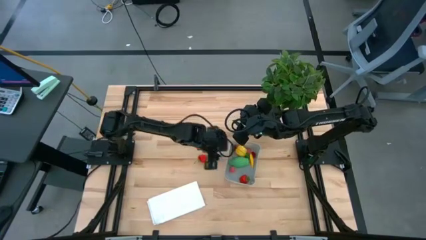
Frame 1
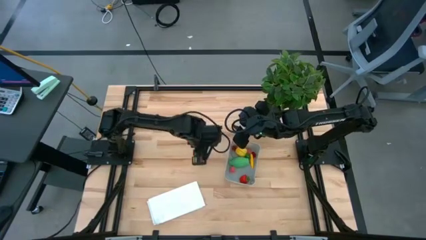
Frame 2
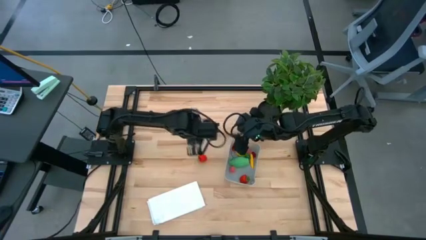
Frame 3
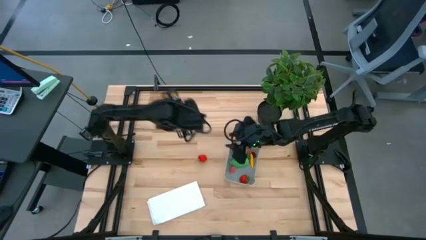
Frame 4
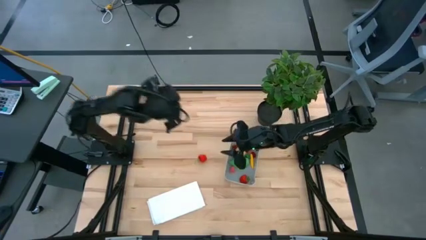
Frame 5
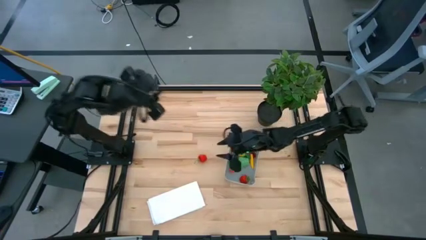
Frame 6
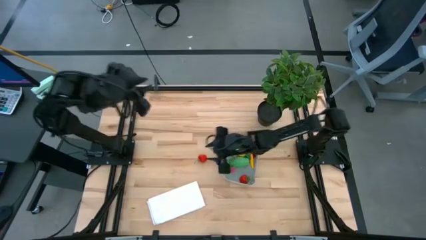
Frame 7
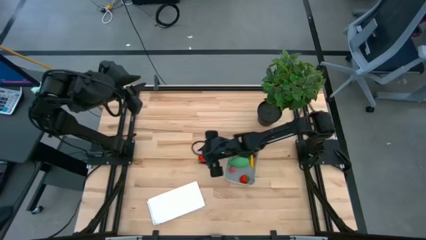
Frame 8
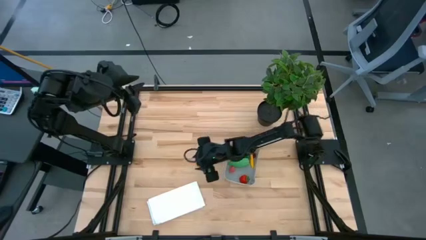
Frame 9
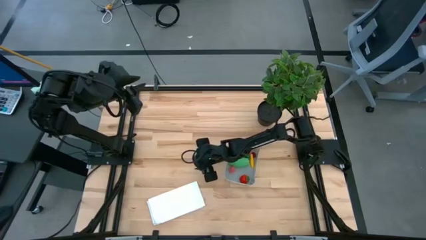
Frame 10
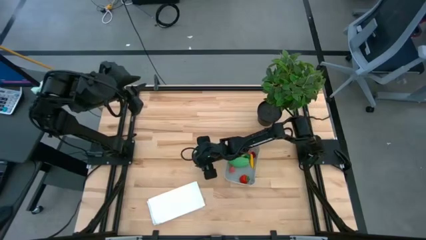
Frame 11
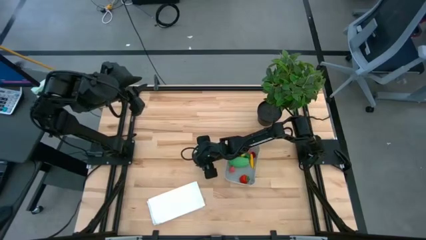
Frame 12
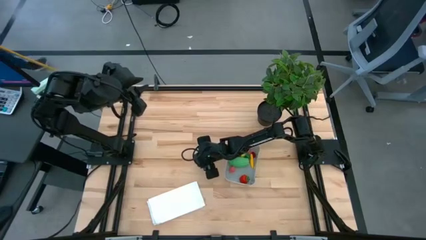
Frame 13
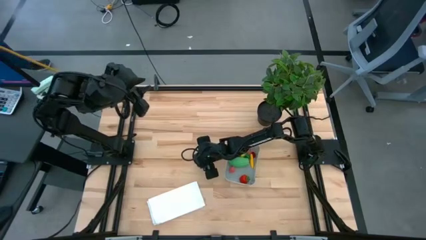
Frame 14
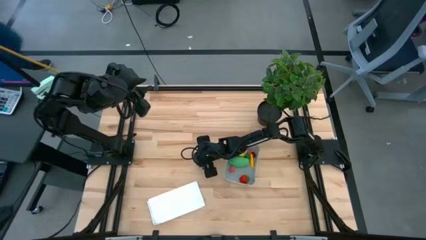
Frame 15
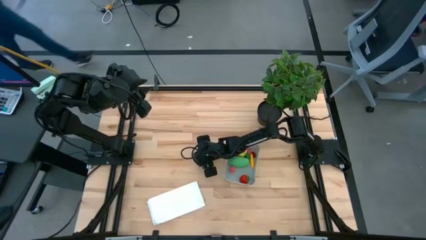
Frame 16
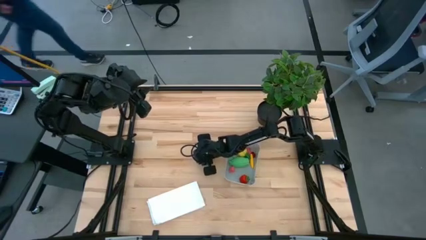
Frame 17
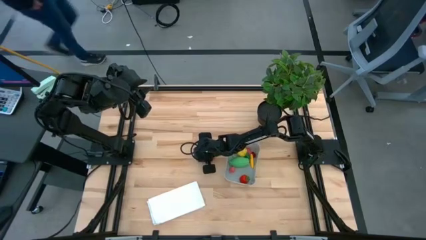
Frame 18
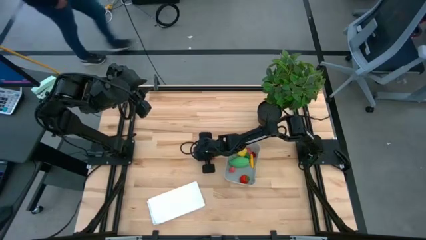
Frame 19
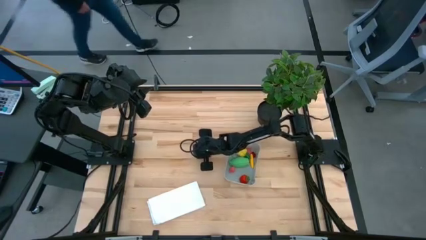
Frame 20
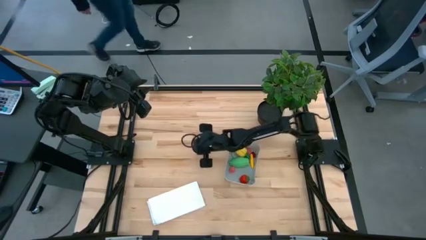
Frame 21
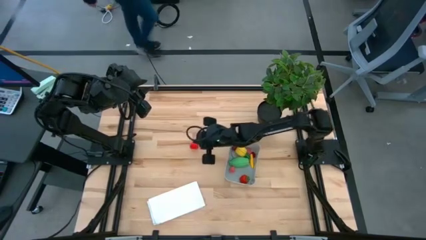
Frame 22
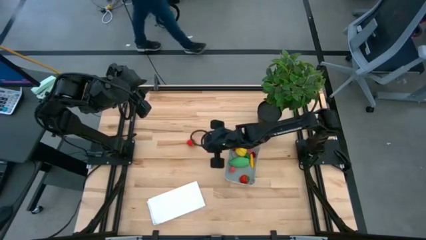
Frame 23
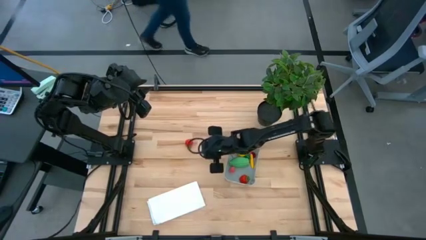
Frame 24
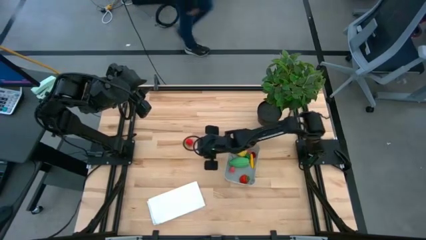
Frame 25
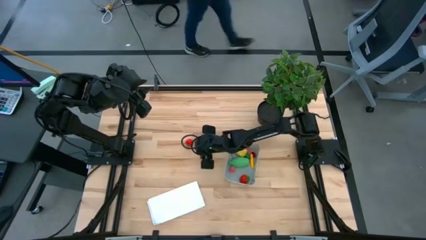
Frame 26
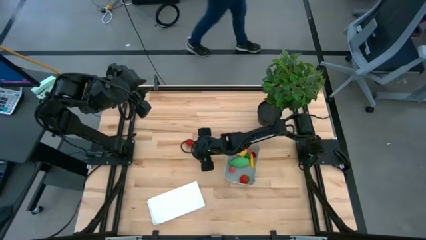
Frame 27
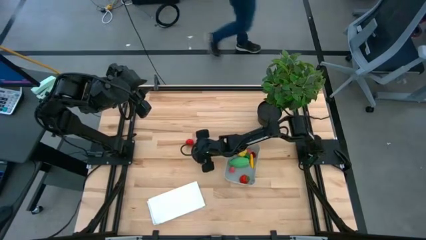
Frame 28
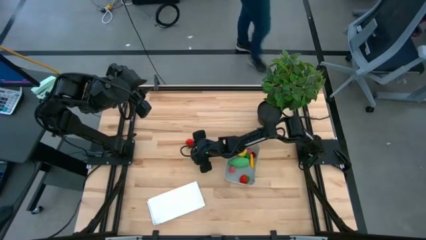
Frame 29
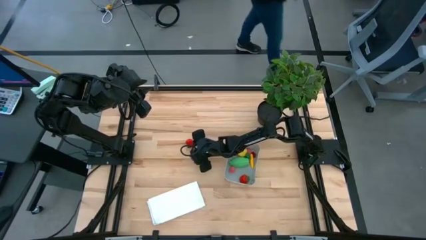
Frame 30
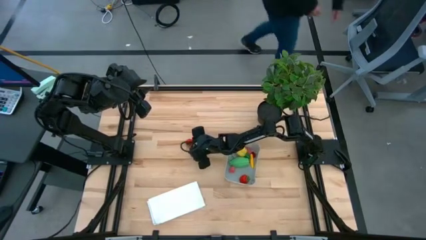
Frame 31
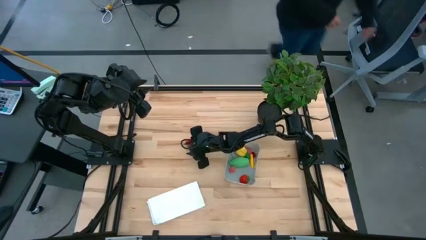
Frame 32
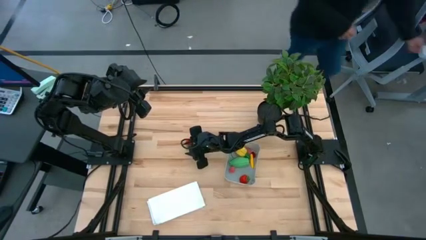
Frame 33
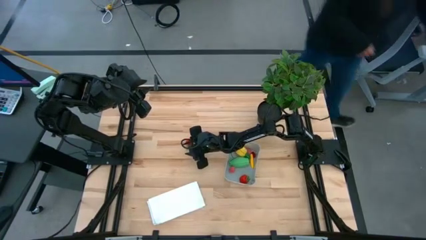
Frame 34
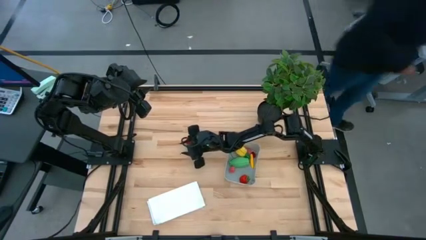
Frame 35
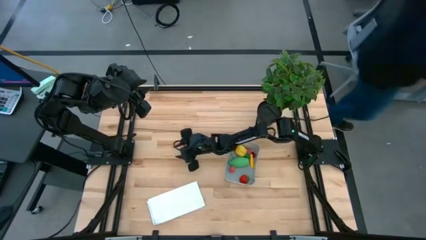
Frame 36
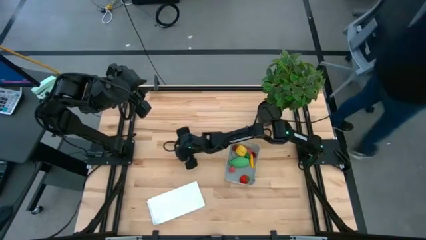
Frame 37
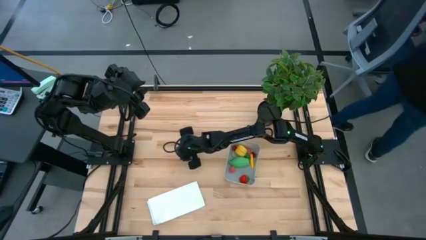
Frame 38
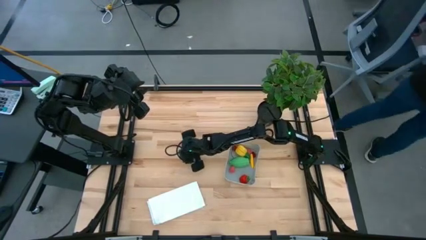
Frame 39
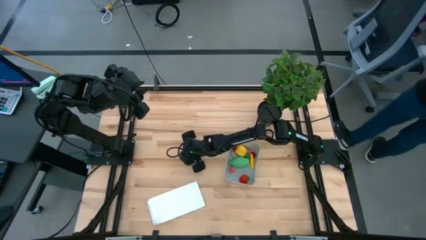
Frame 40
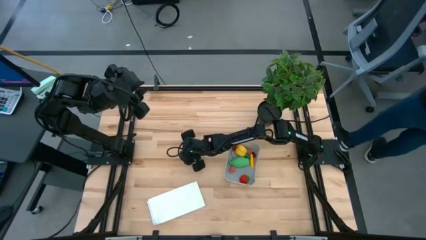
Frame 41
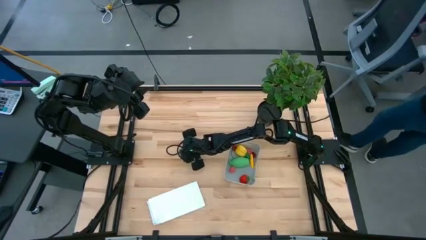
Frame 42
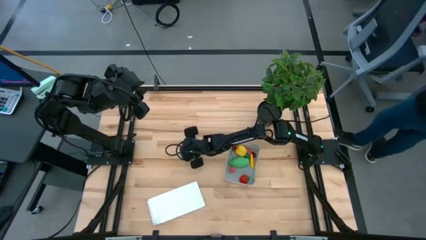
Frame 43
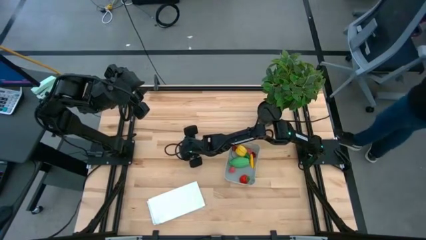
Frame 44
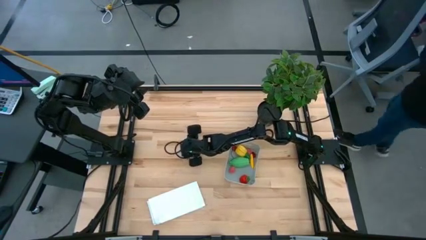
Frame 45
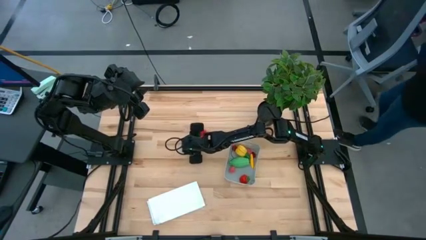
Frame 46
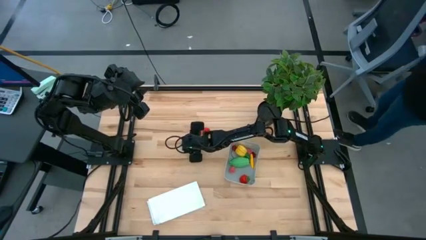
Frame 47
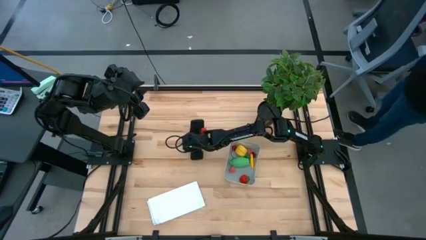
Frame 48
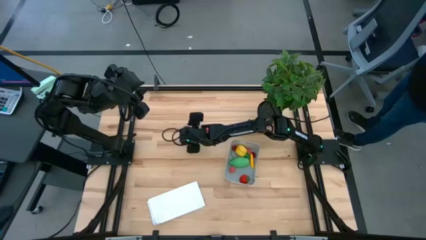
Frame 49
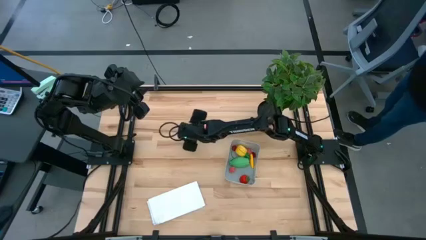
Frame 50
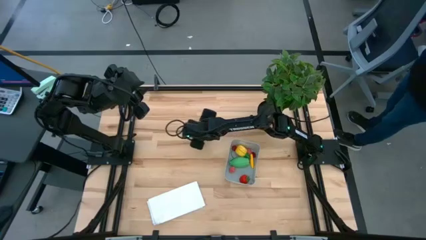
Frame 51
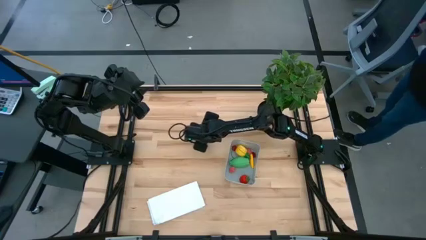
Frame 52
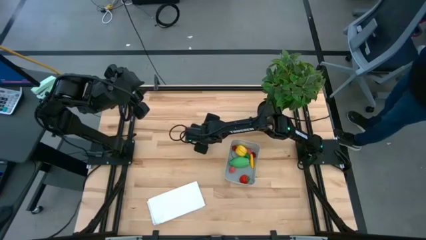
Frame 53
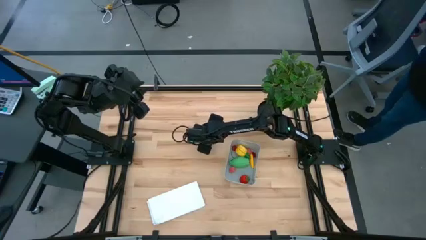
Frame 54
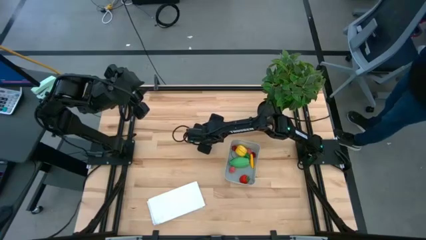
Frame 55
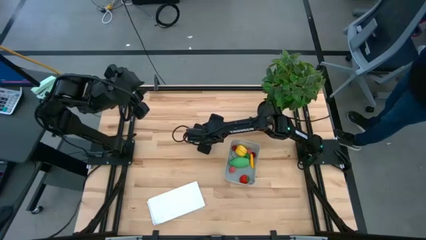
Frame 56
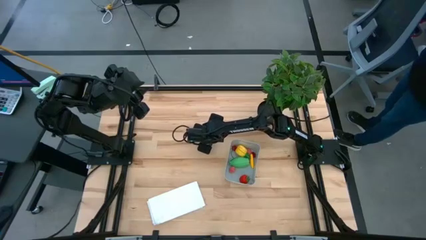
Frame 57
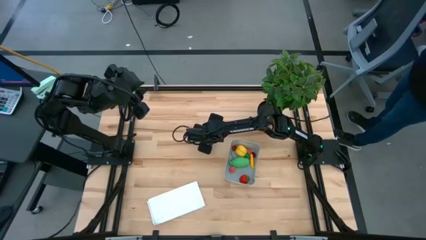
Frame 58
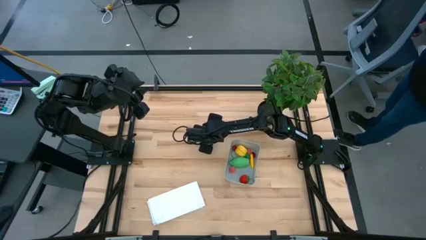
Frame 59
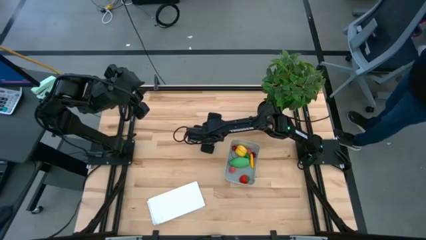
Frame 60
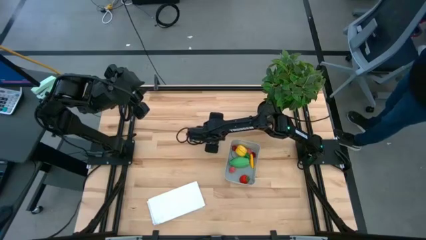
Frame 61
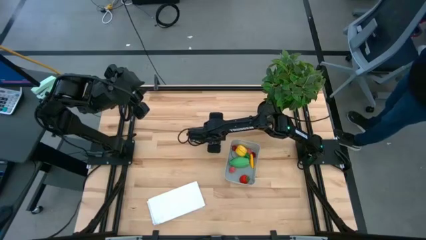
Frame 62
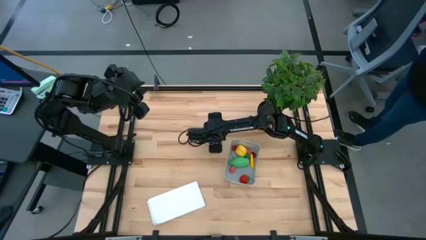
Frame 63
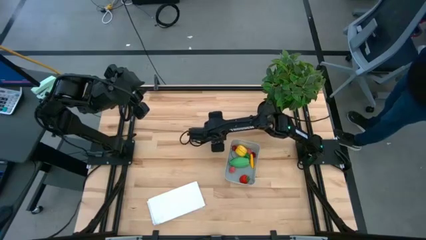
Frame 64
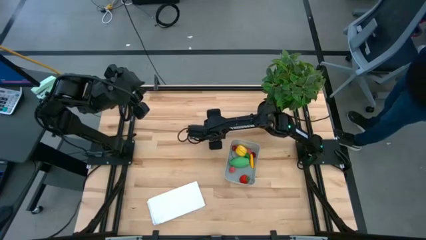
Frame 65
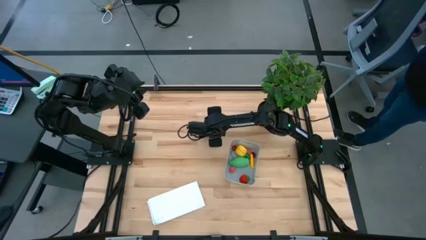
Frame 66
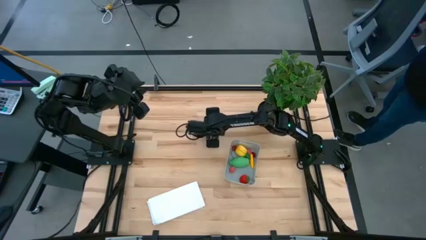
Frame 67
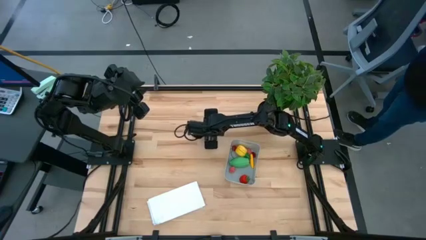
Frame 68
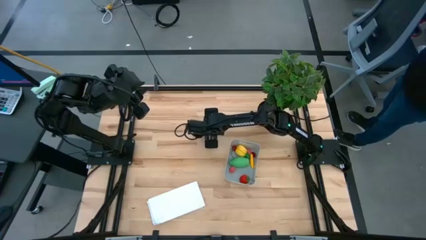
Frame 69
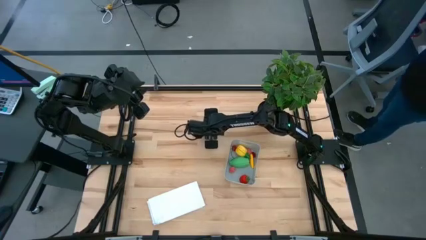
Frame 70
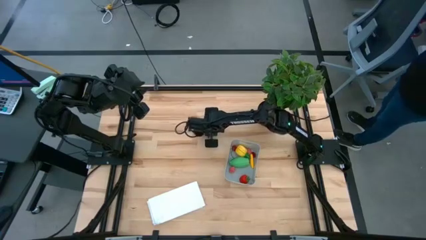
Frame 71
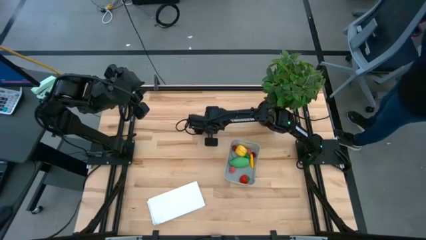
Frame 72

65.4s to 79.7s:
Task: Pick and placing Produce into tupperware
Put the red strawberry into the gray bin

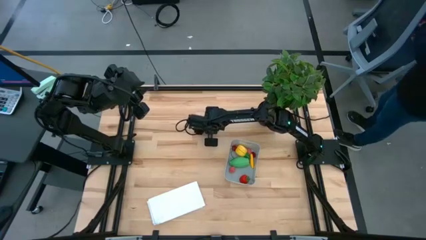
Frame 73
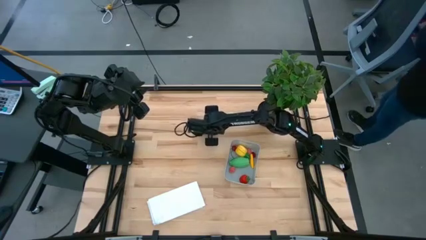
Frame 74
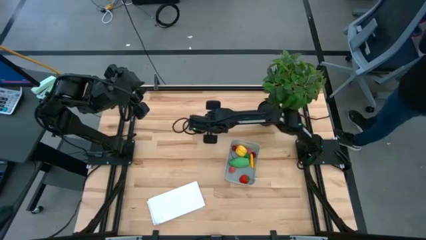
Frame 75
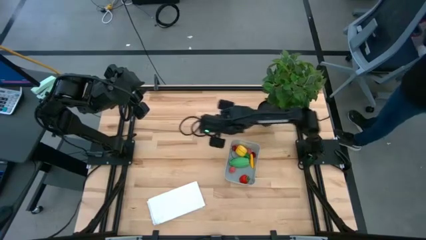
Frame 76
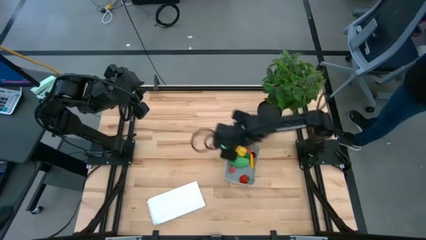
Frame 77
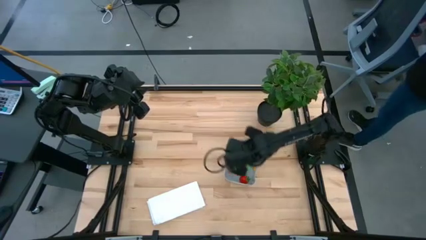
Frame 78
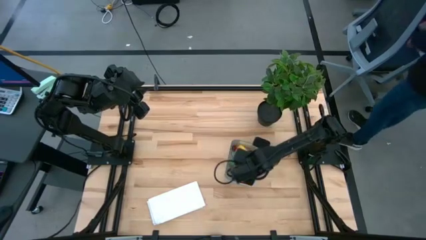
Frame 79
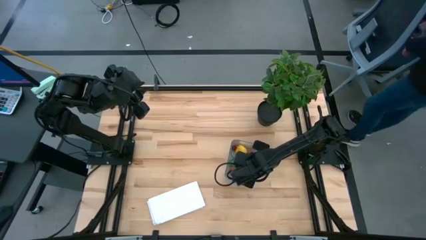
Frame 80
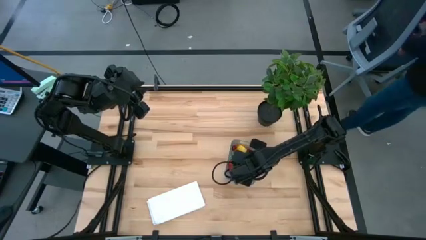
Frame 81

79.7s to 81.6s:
Put the red strawberry into the gray bin

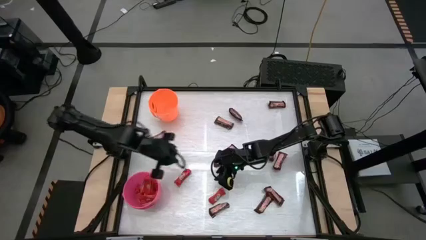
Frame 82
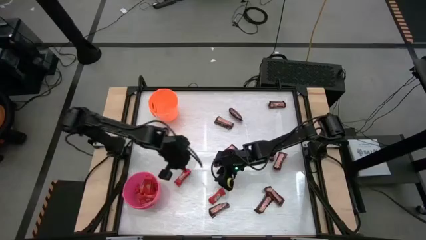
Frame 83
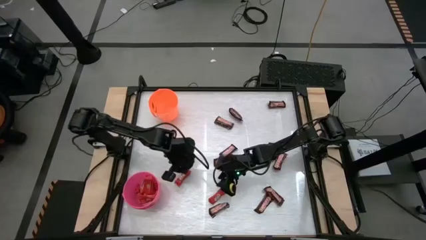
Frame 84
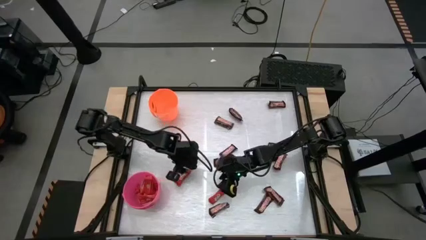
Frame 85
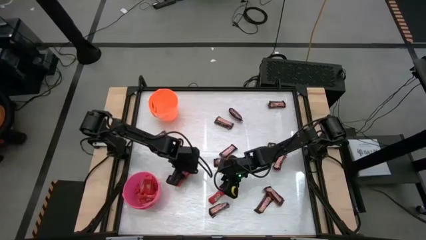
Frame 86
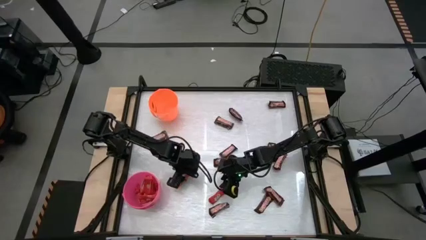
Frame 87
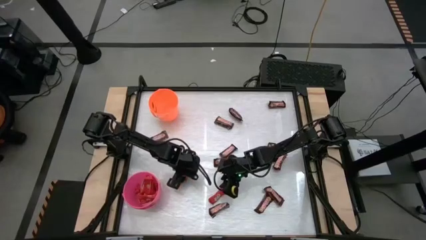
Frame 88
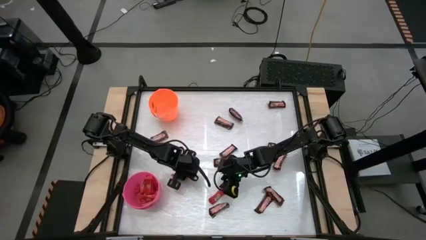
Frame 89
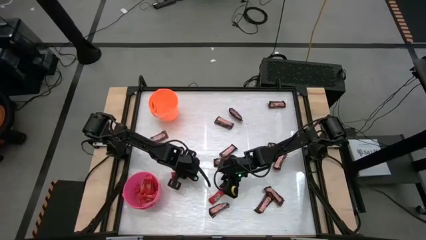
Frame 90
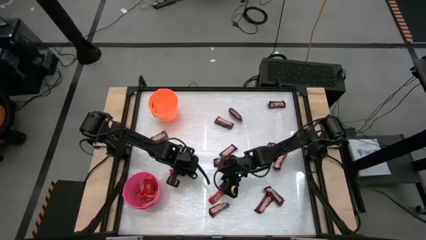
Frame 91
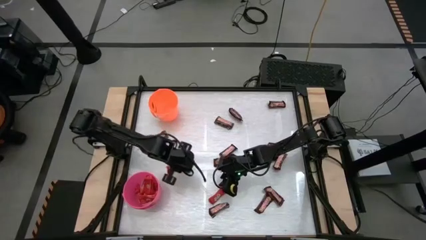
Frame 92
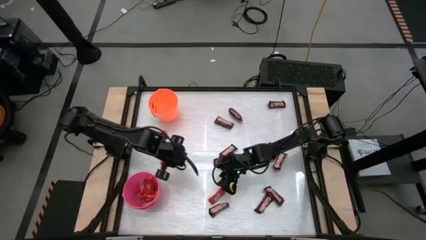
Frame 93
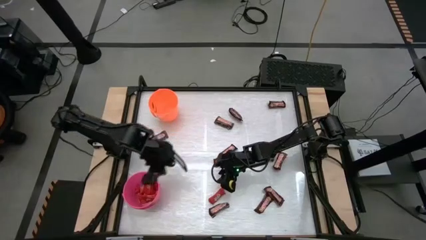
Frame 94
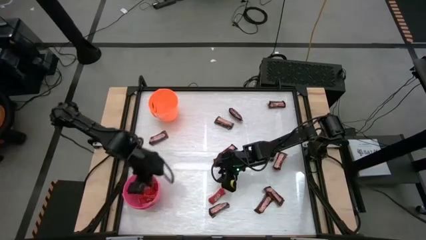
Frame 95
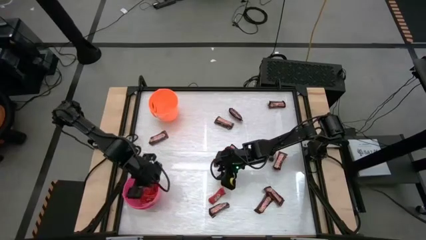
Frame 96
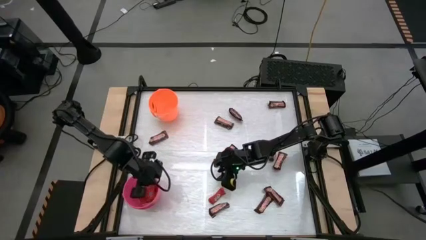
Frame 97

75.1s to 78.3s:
Task: Sort candy by brand, put in halloween buckets
Put the red chocolate bar into the pink bucket
